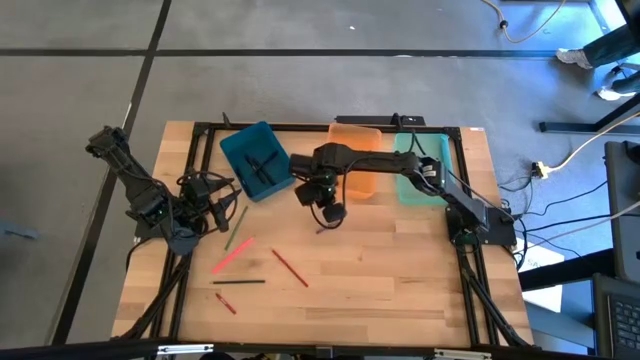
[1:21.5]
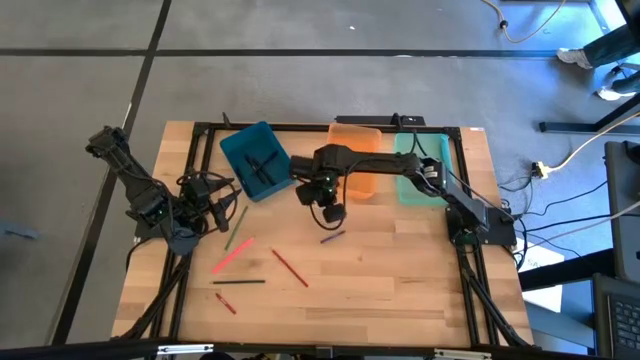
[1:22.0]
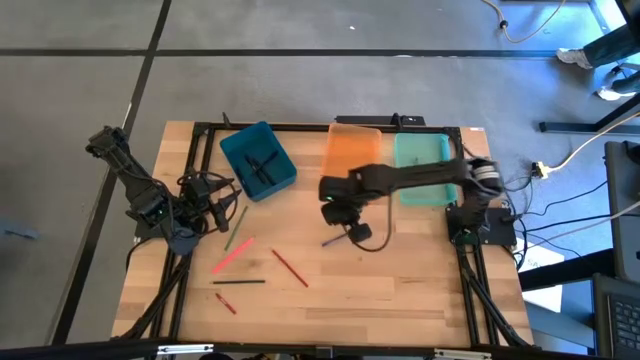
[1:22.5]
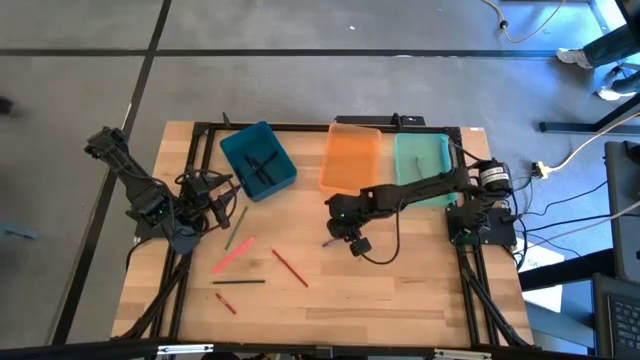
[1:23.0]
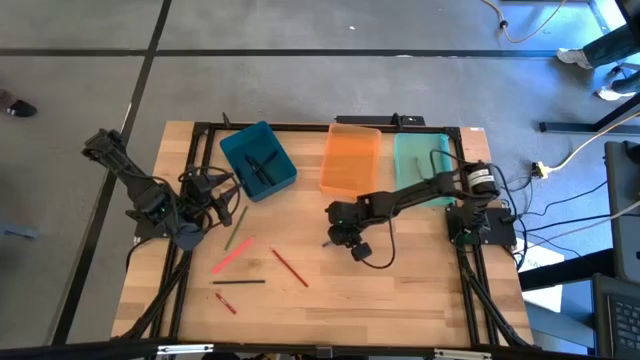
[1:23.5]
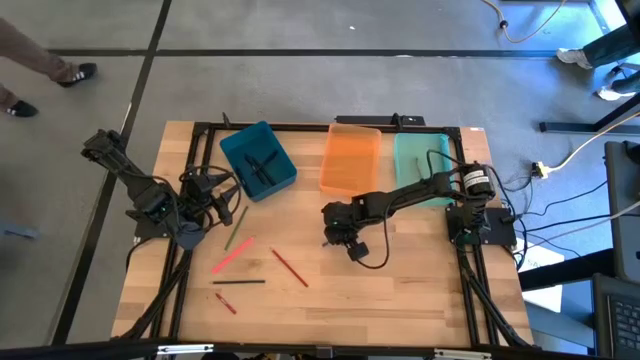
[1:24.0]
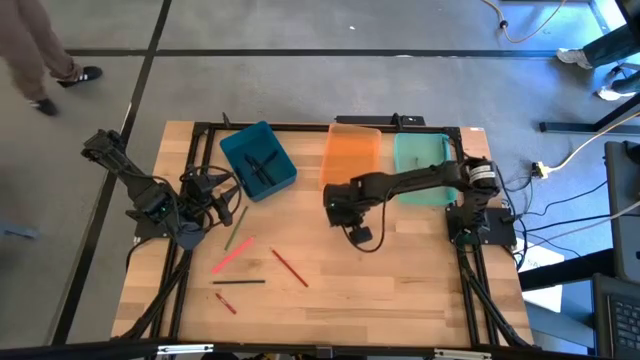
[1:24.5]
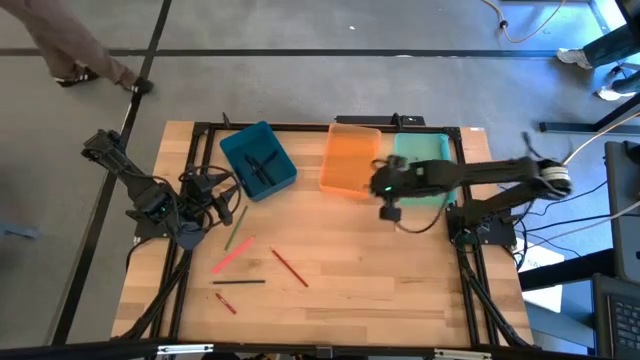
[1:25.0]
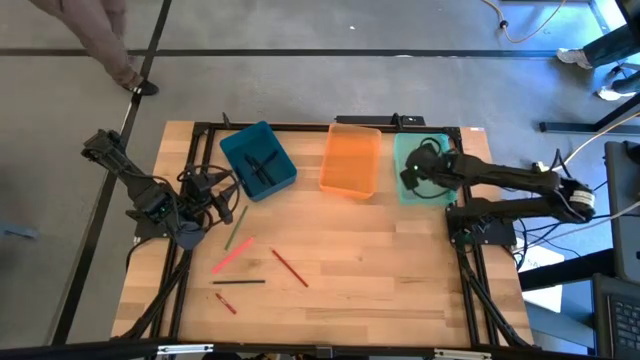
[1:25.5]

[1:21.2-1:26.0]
Task: Sort crayons/erasers/pens/pencils in bins
Put the blue crayon into the light blue bin

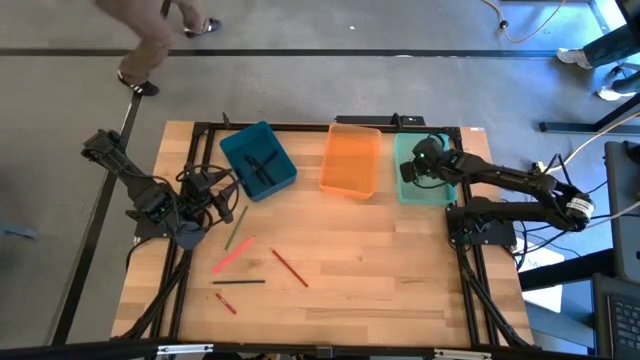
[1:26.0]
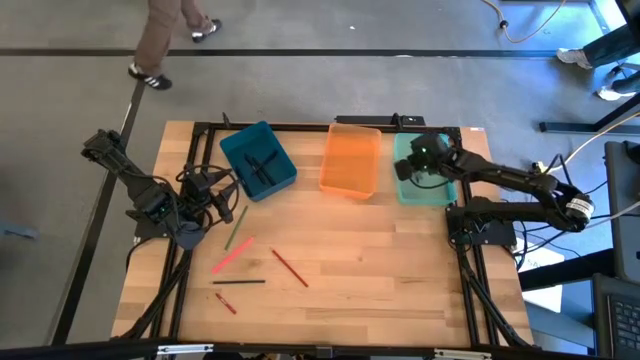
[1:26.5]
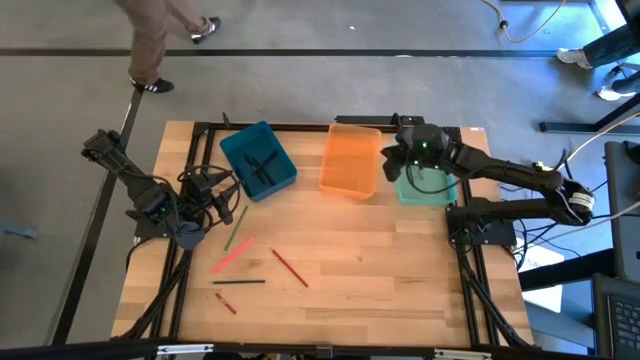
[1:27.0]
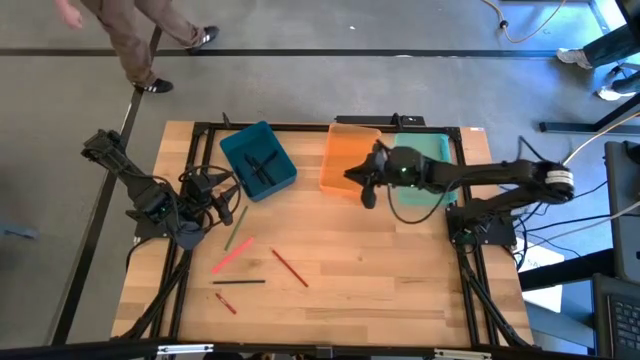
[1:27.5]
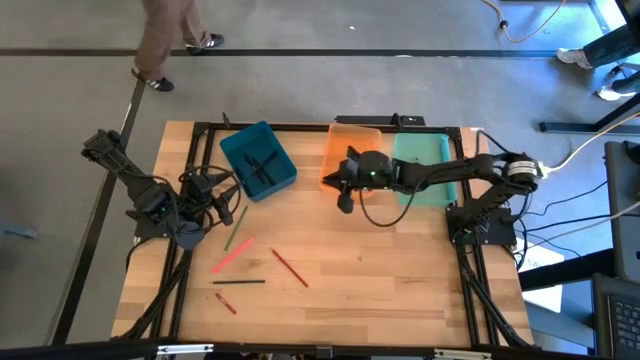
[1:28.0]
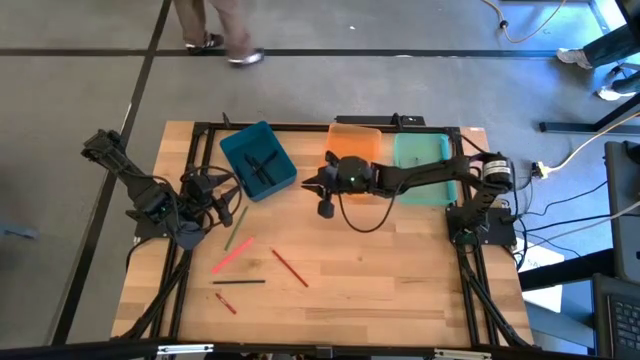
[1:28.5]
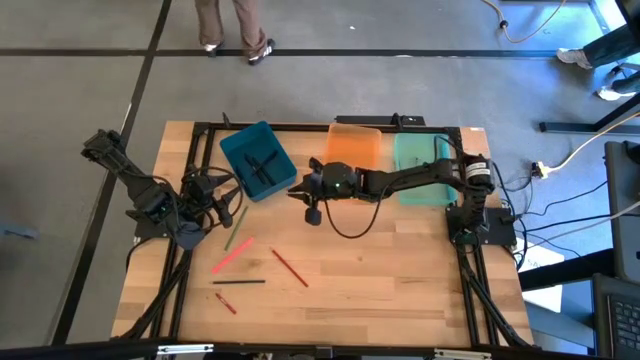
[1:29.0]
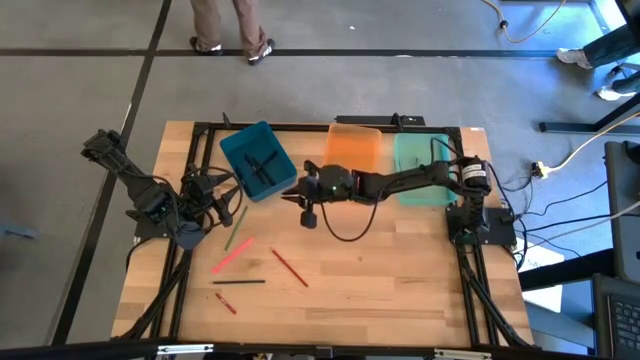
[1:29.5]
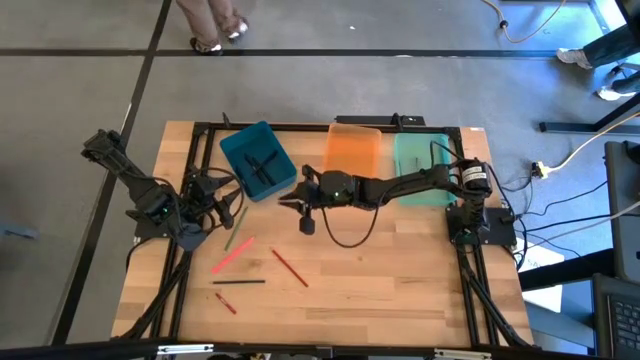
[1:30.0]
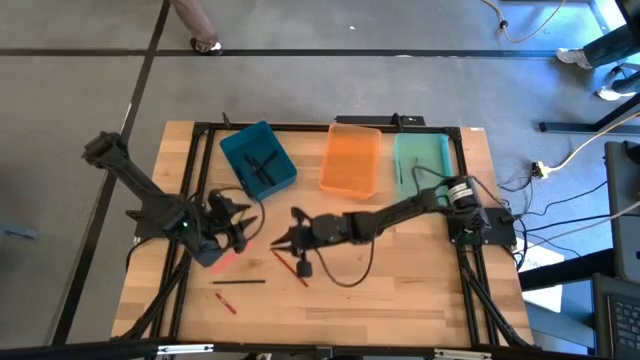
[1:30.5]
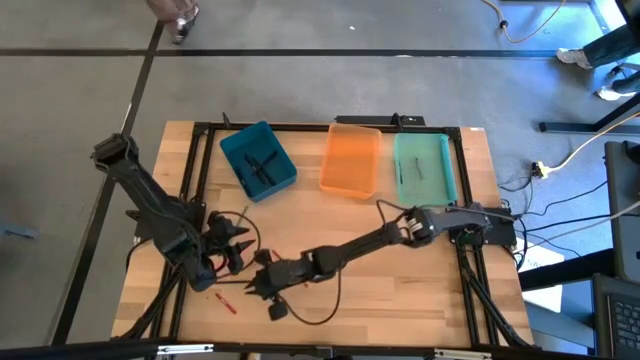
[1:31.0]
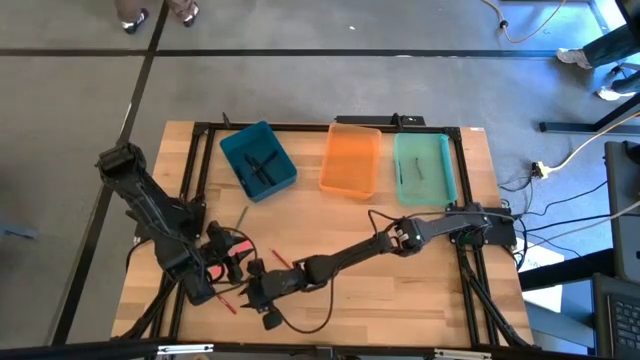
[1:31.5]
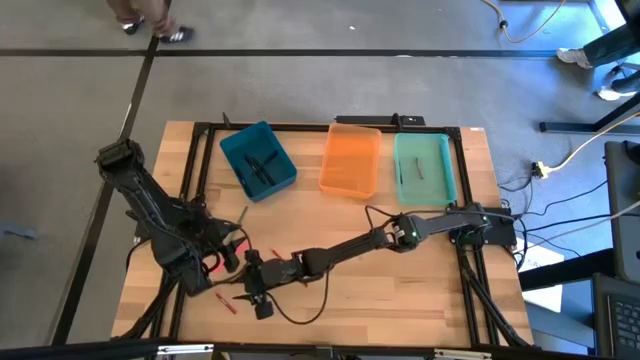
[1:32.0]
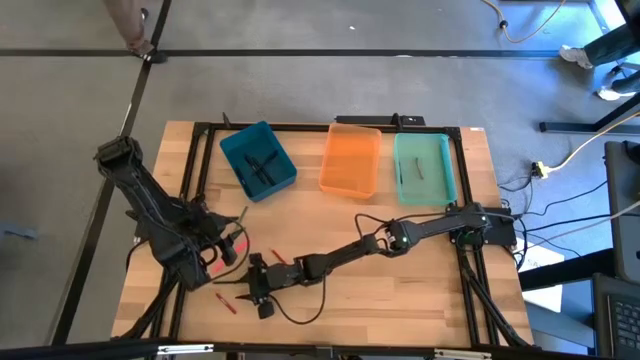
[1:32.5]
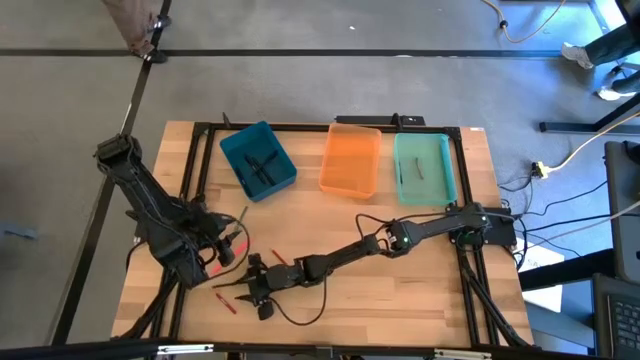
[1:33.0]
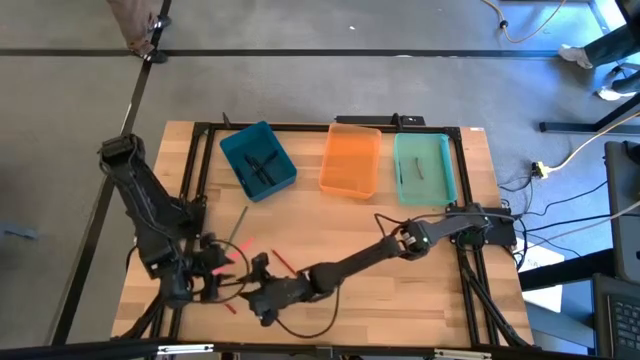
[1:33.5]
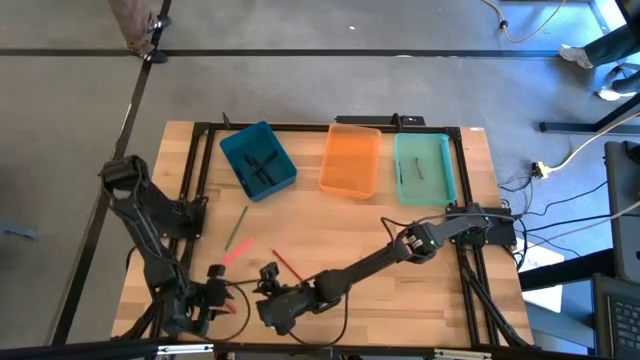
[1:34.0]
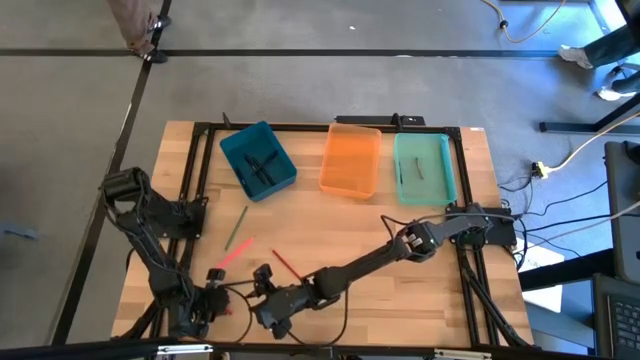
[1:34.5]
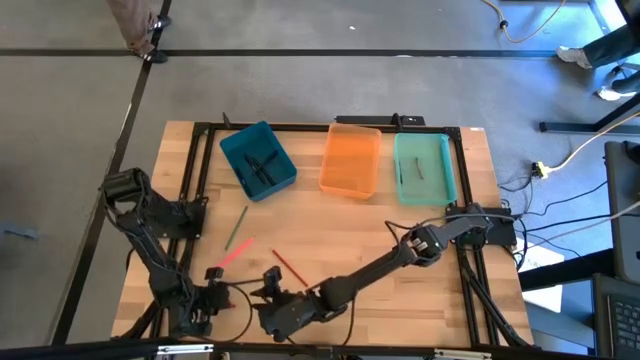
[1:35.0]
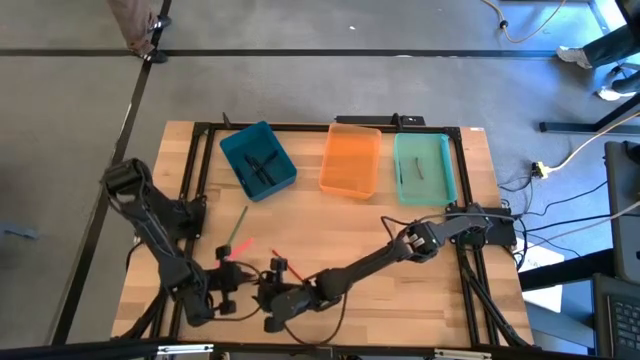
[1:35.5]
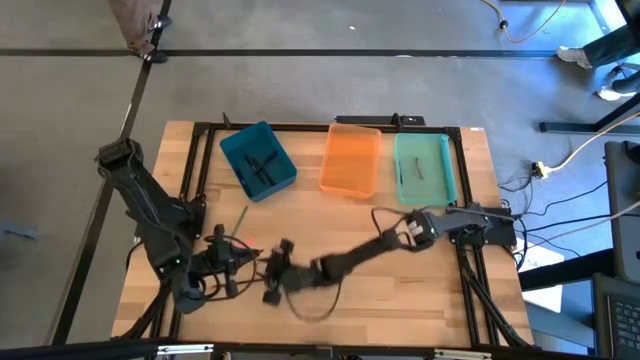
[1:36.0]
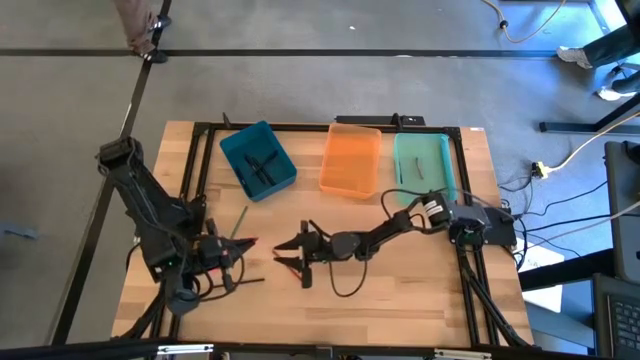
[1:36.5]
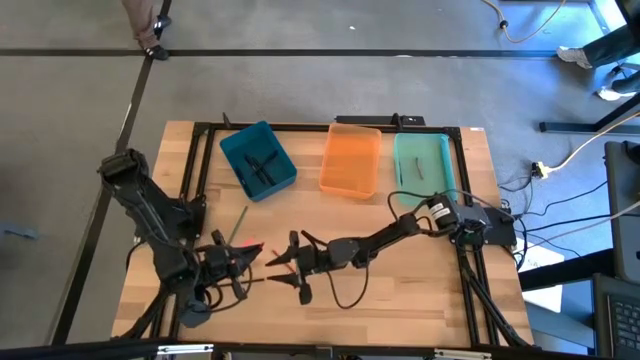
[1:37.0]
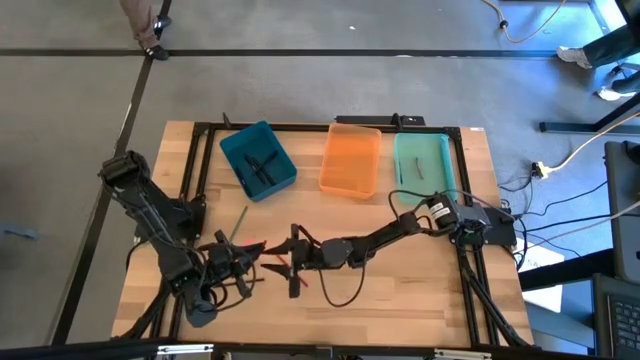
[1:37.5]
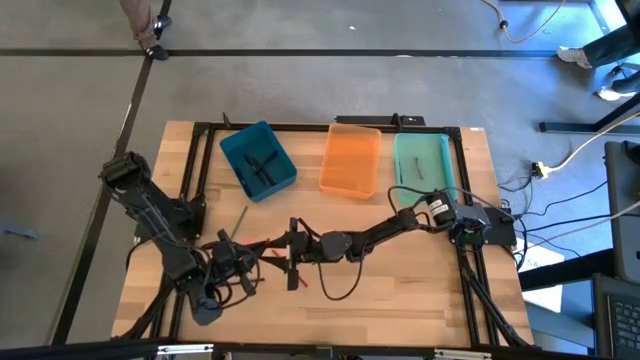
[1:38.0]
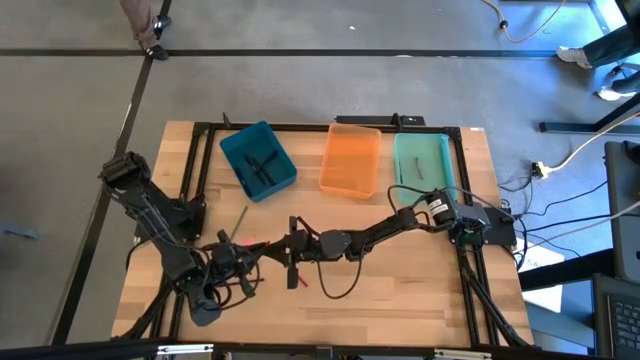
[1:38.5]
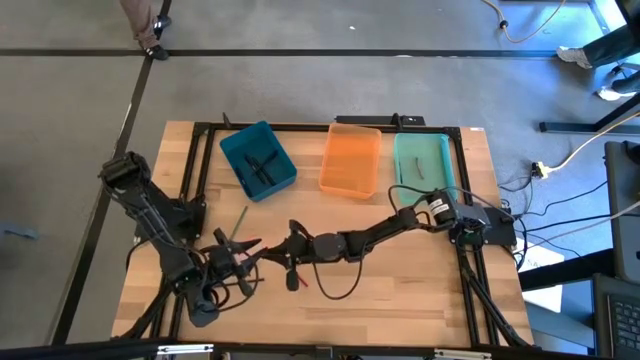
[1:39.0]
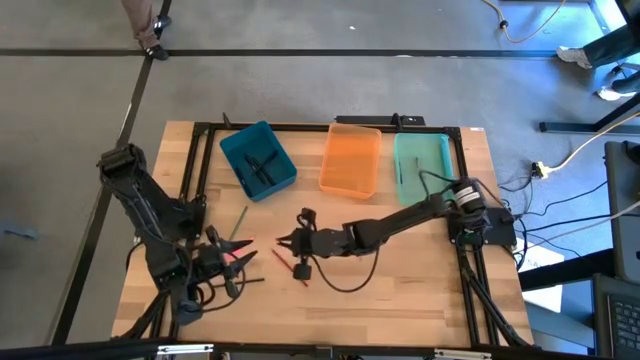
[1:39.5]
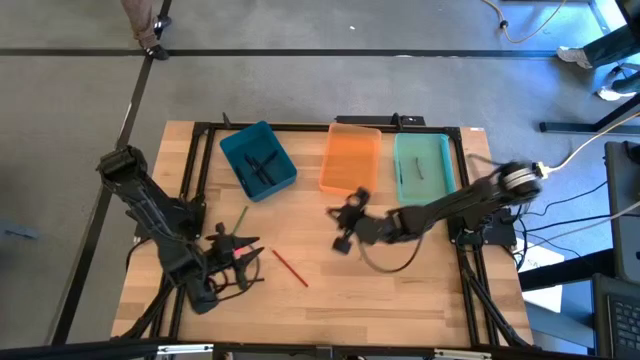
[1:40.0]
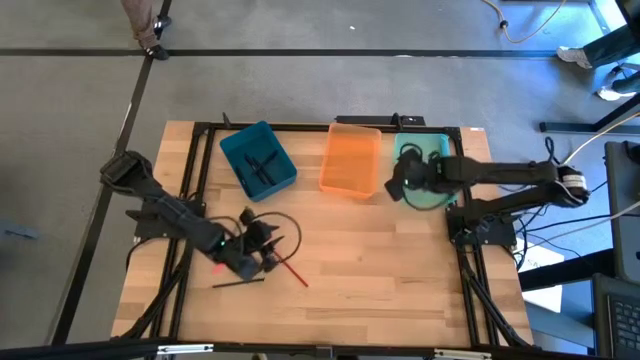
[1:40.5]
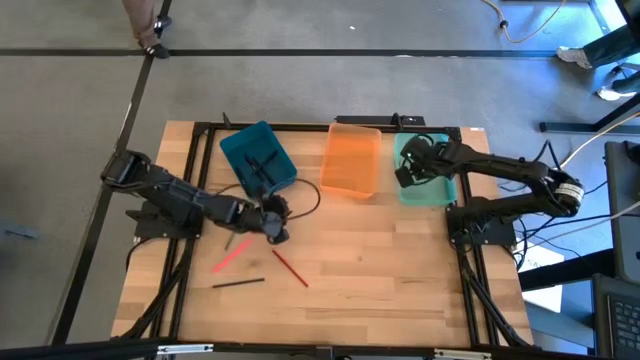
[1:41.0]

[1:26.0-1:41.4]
Put the red crayon into the light blue bin
